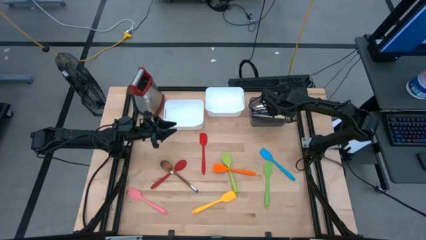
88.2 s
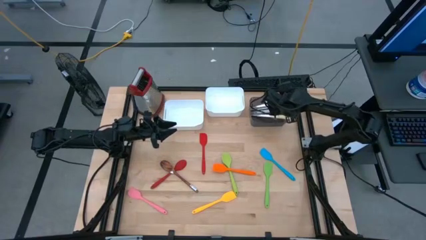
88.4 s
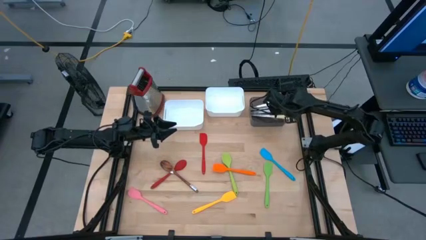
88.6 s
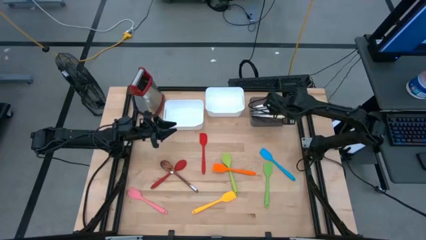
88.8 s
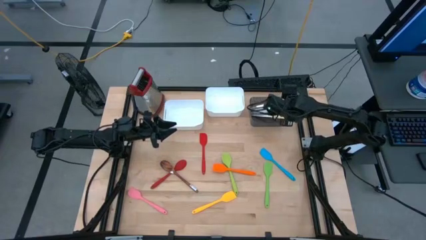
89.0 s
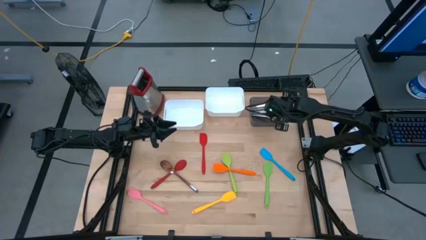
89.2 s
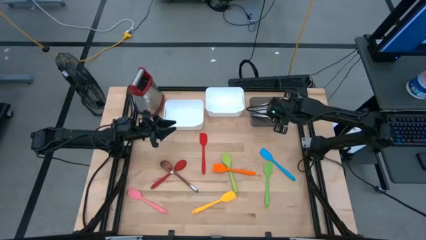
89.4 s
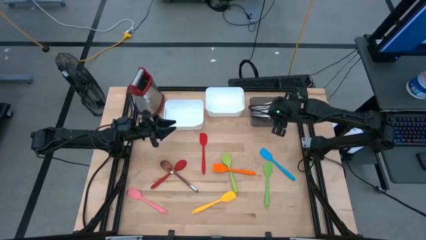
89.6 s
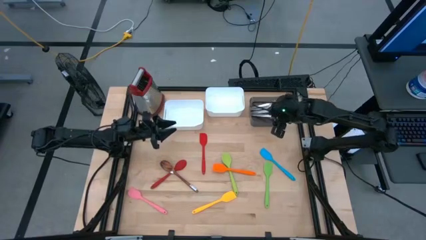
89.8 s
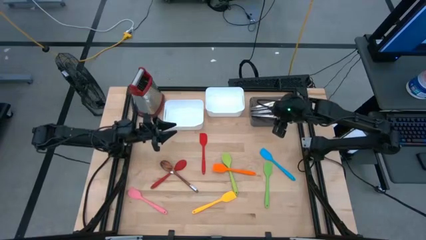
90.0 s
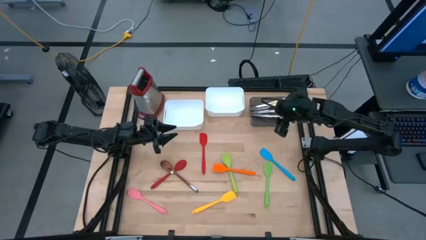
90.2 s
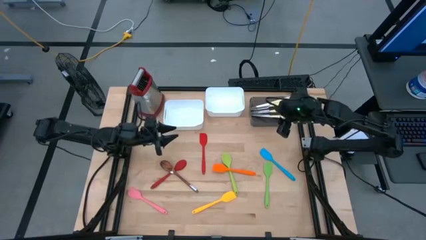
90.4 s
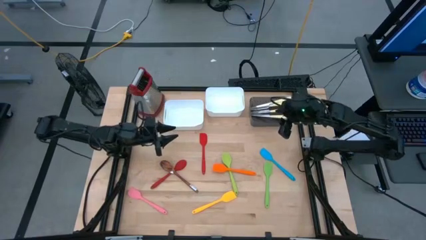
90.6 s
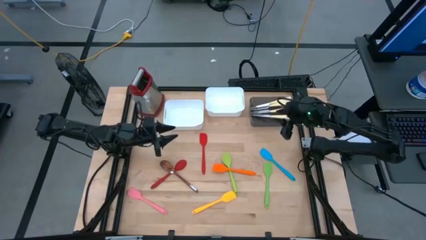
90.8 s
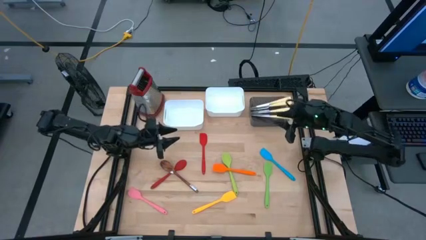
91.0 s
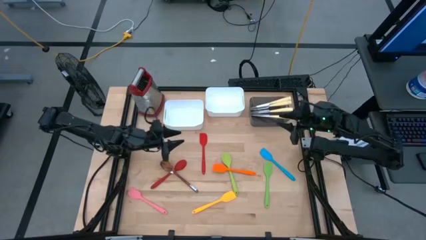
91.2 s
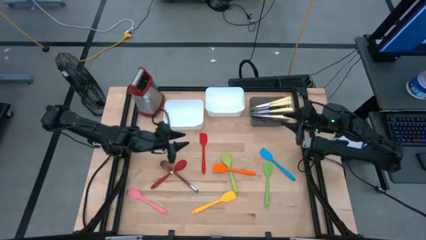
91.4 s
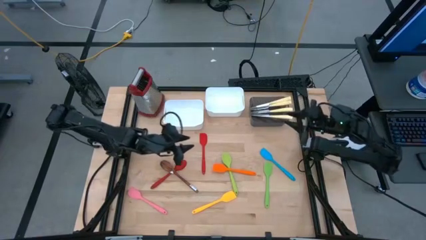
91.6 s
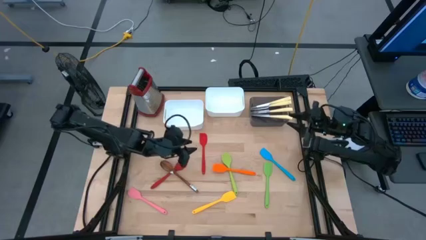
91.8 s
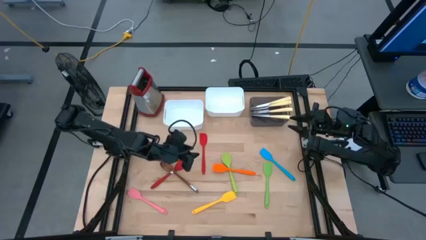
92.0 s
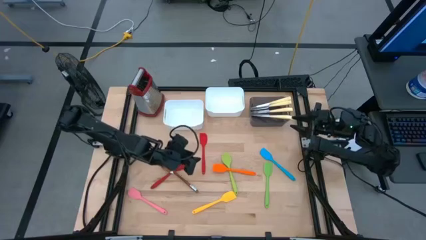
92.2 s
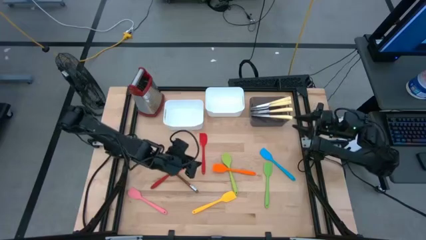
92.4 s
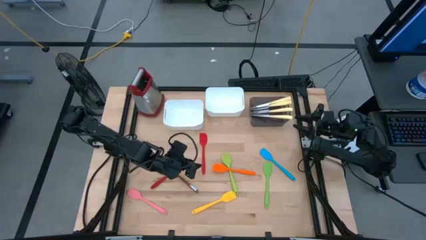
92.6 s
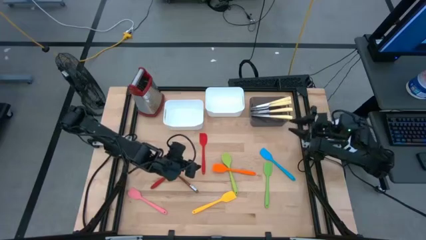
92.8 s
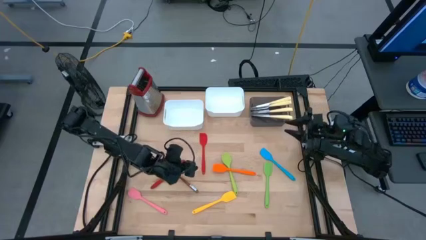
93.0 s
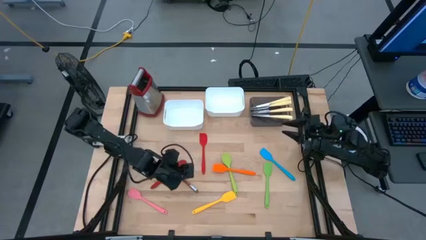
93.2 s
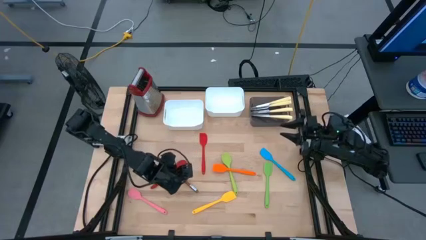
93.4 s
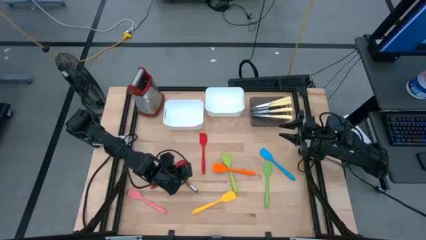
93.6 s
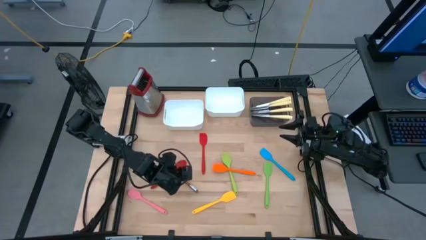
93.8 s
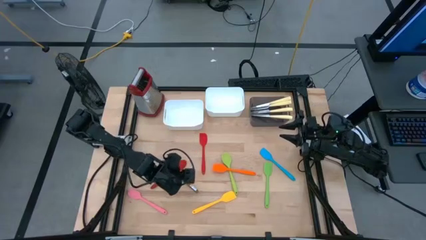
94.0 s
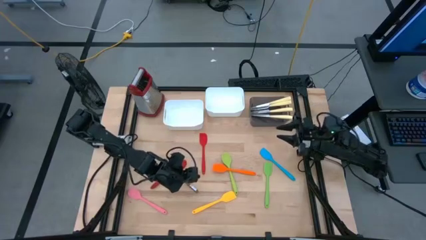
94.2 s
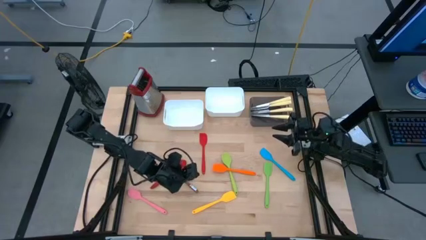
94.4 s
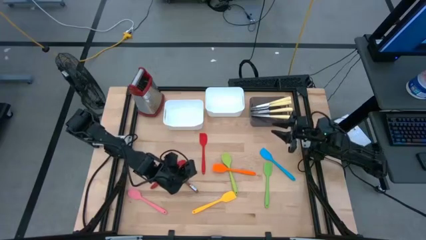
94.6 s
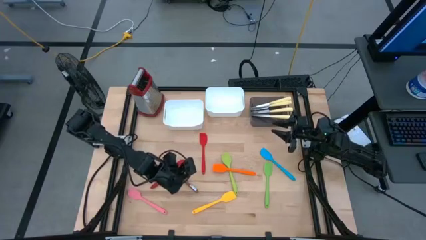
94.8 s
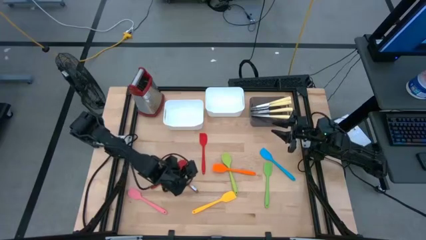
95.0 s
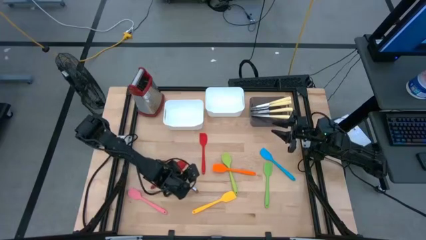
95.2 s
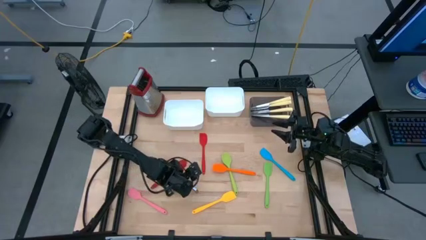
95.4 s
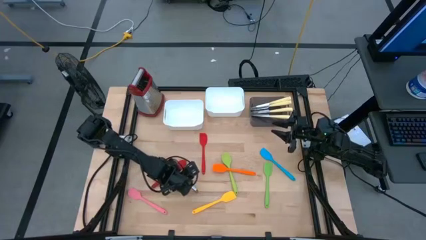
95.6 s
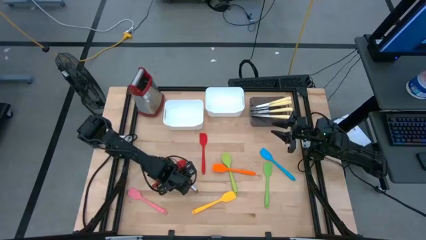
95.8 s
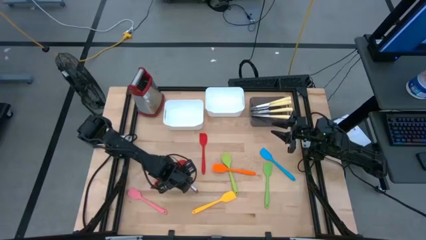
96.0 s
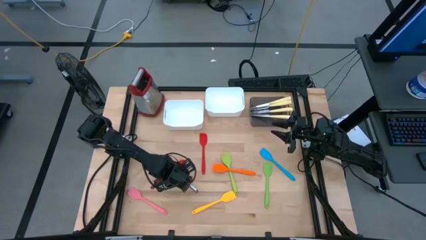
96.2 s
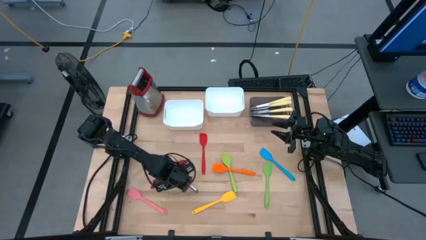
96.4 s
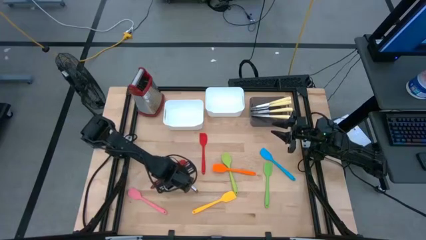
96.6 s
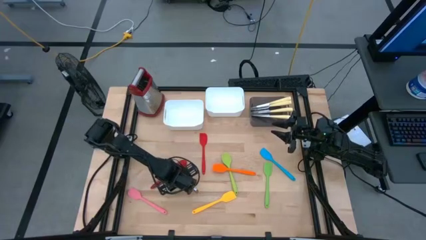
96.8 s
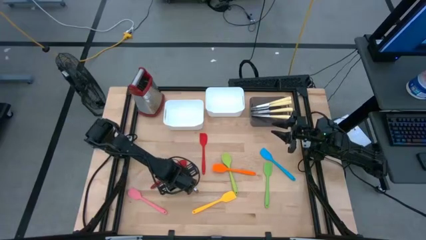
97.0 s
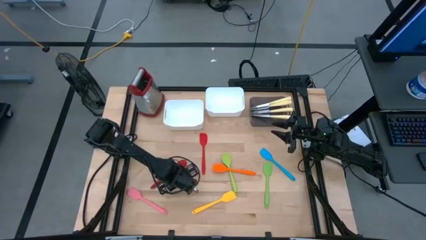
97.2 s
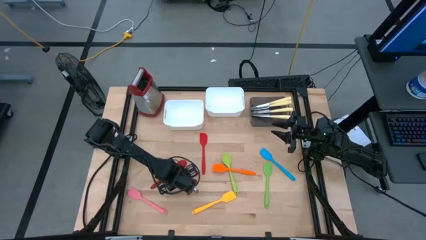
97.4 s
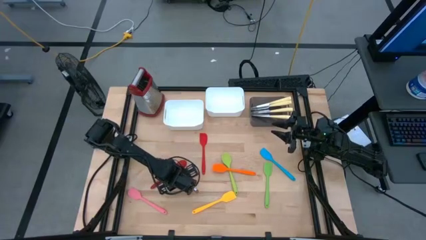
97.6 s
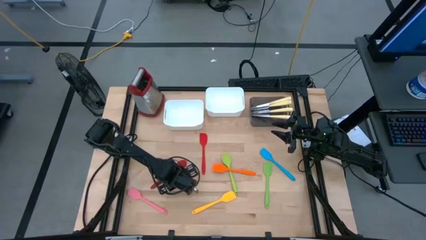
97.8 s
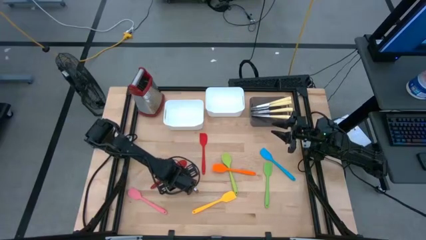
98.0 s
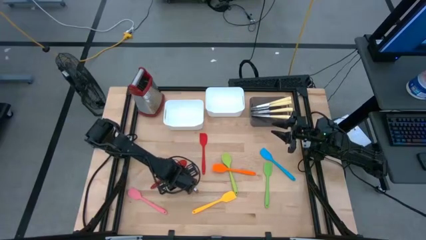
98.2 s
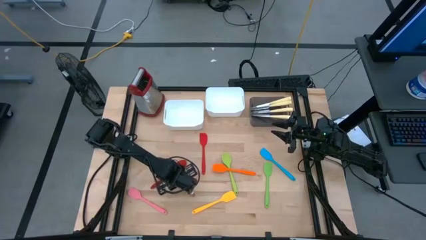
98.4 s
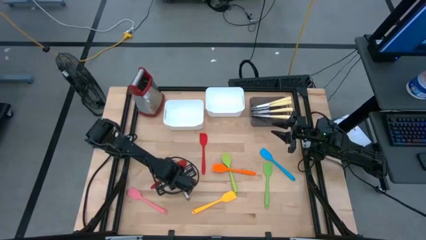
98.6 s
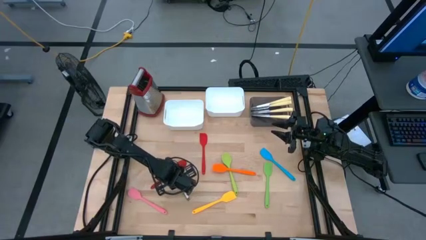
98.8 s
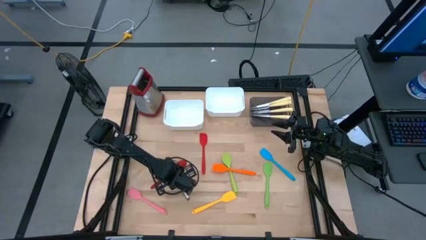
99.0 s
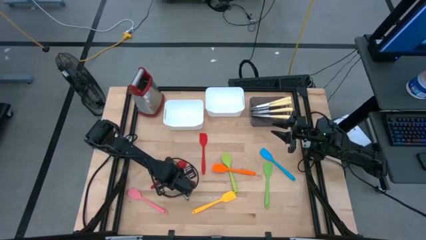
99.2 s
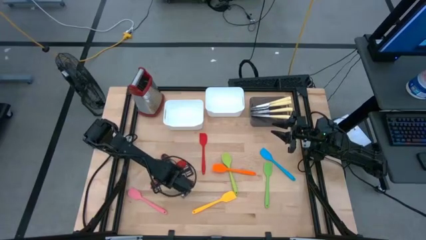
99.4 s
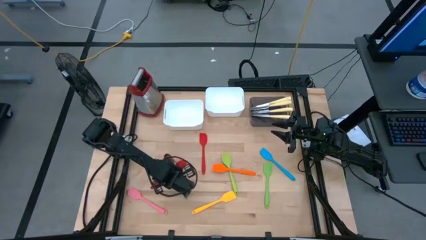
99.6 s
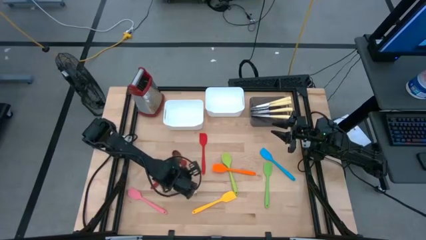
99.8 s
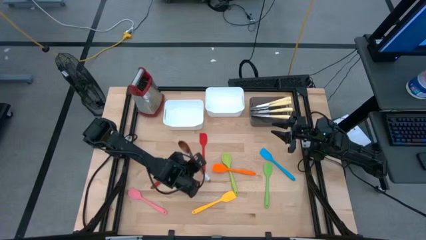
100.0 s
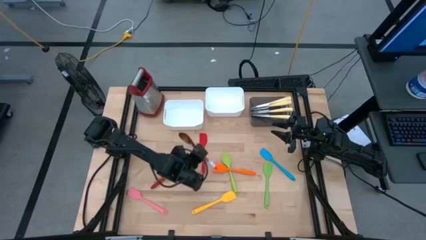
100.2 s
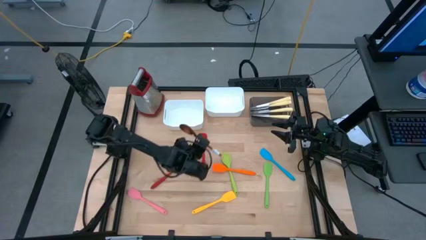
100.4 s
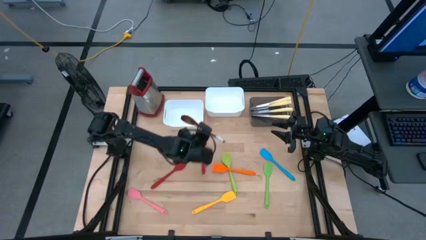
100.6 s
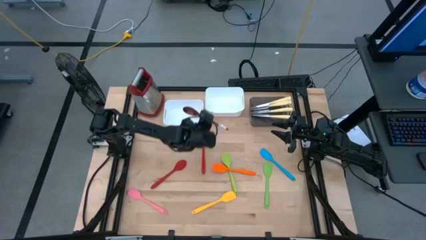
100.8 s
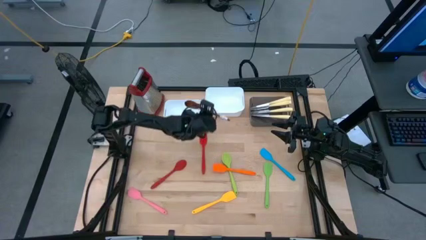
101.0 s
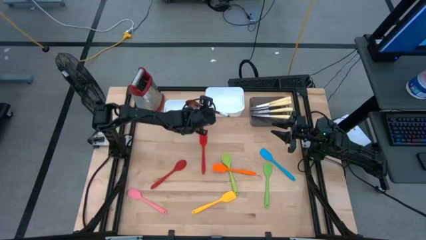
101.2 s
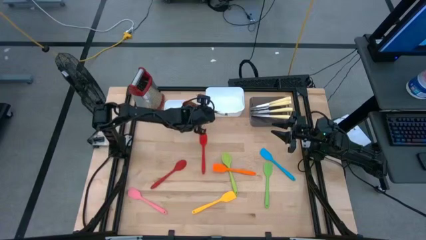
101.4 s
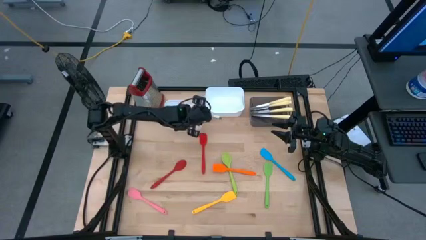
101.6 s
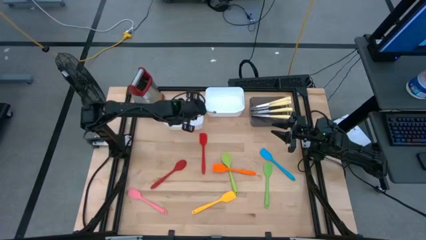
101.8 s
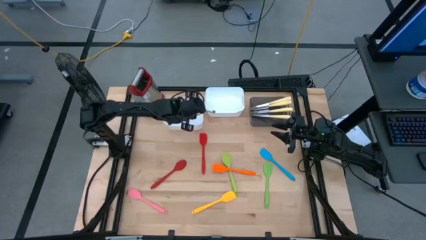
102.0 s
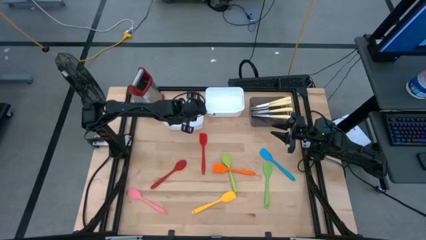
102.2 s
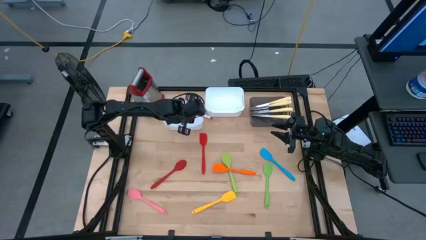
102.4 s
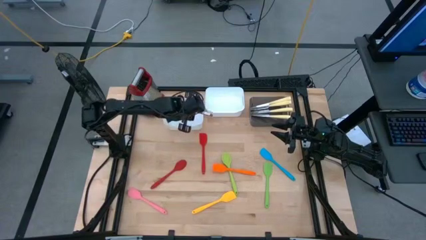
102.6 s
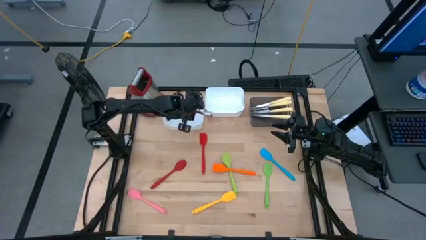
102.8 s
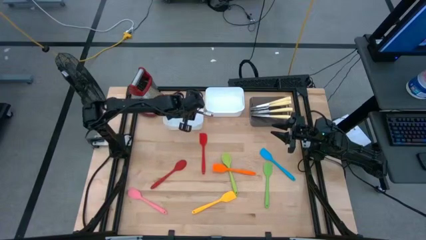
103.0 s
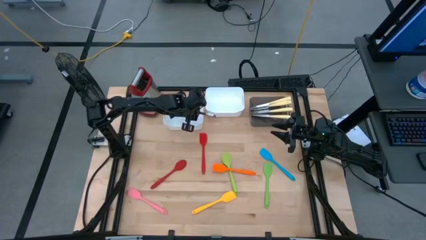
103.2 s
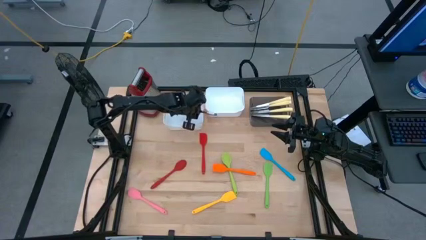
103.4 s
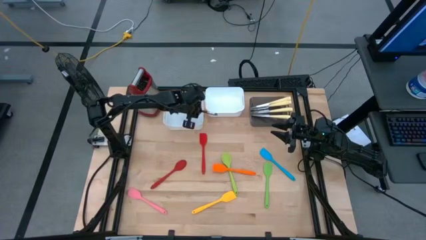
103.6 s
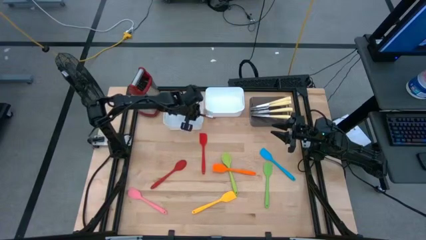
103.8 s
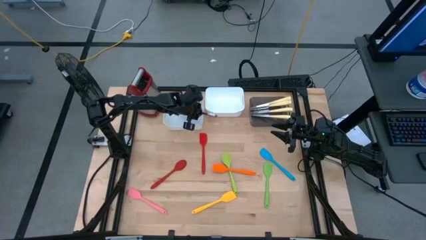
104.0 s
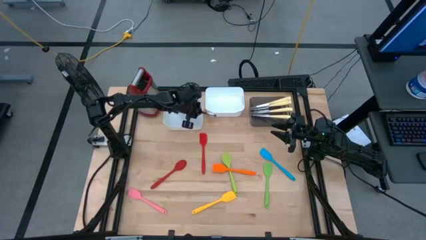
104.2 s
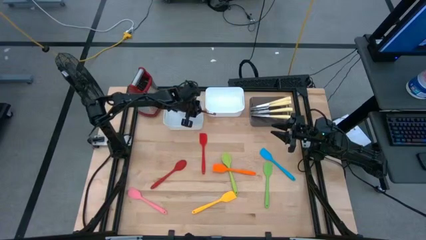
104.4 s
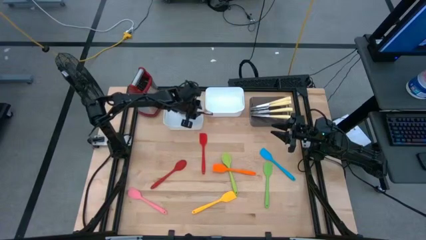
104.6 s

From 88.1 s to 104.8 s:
Task: Pick & Place Kitchen Items
Put the wooden serving spoon into the left white bin
